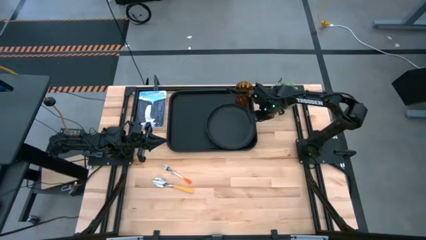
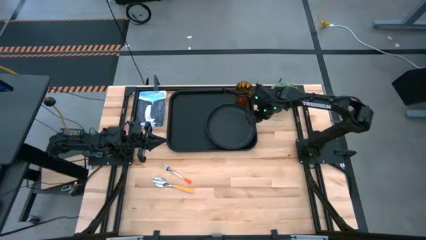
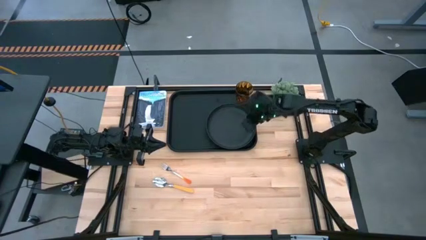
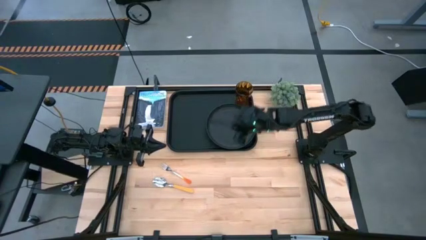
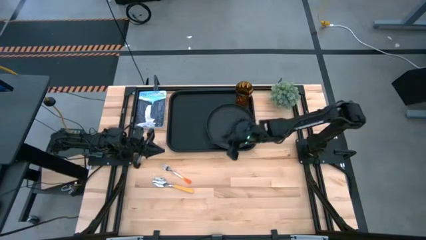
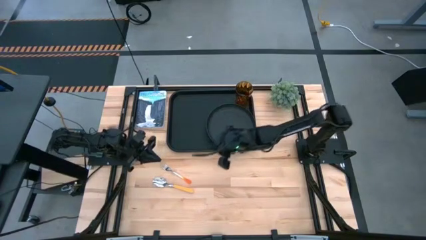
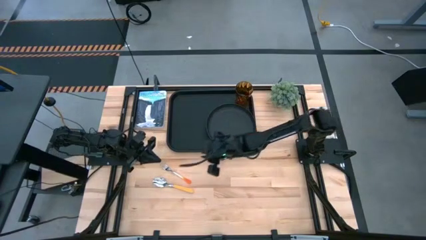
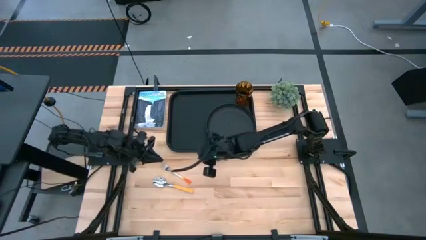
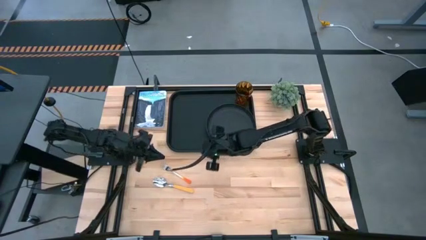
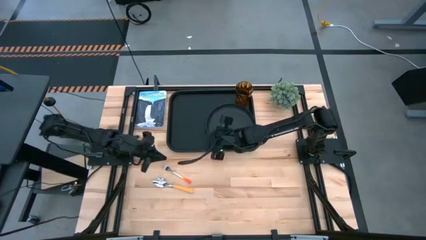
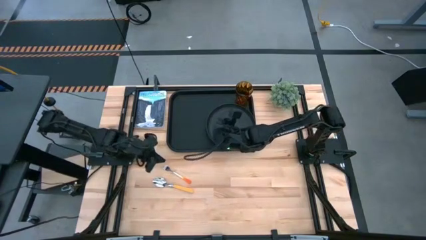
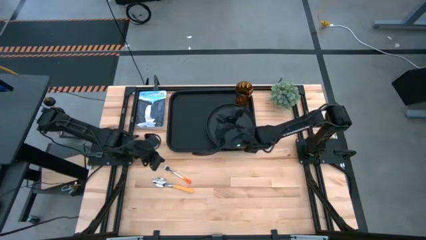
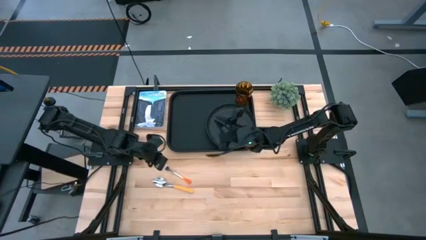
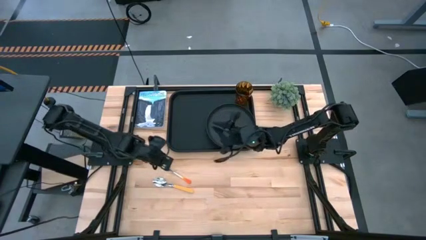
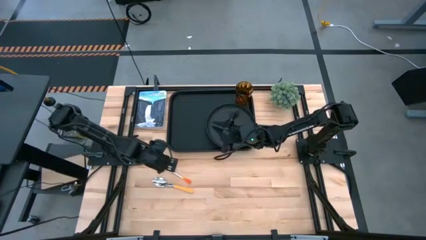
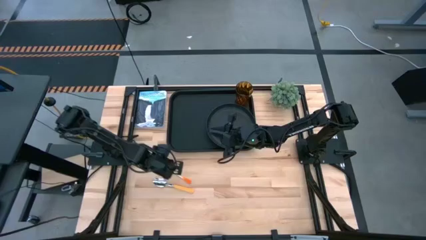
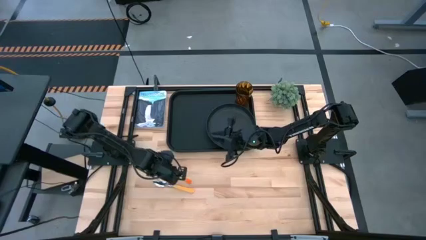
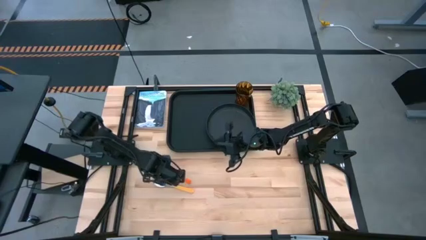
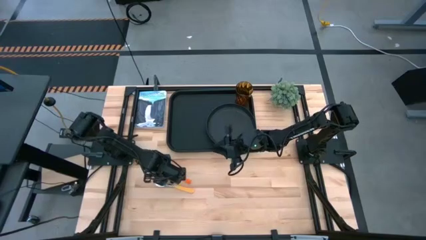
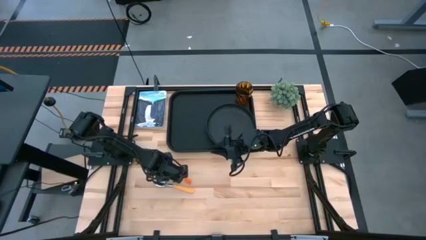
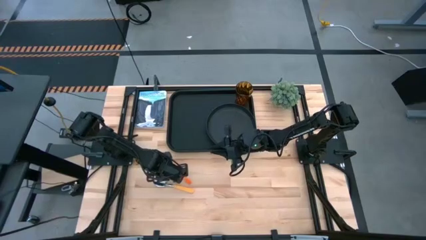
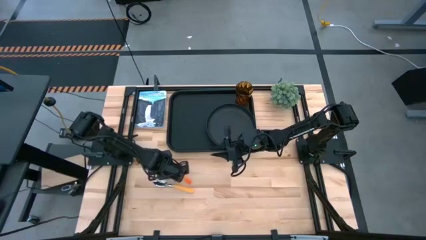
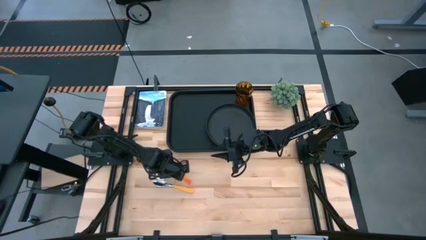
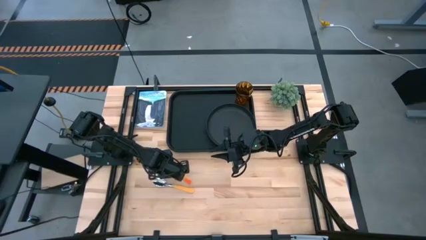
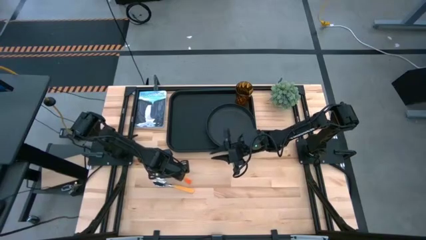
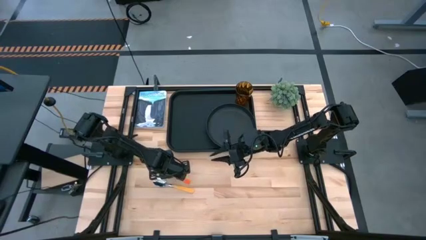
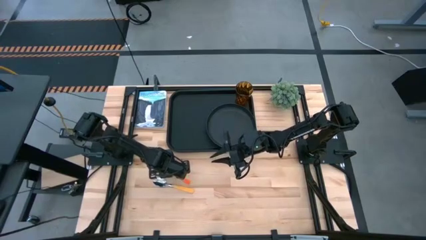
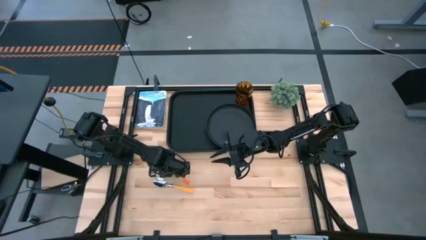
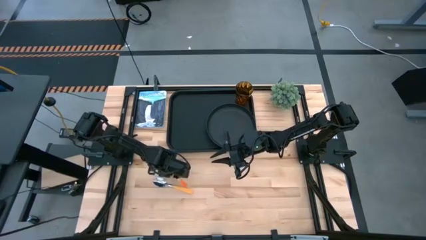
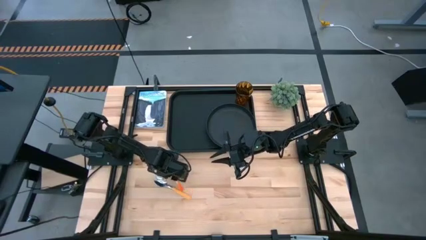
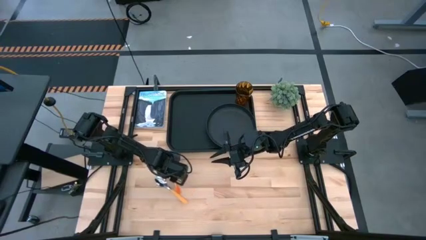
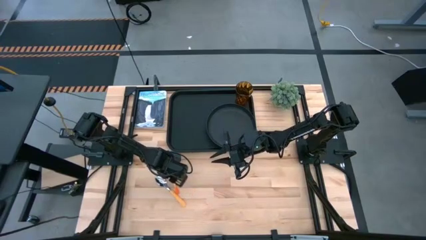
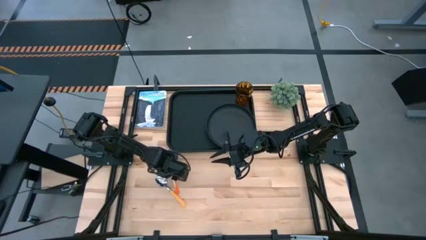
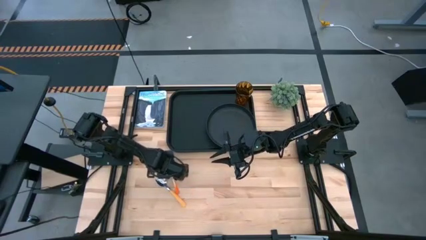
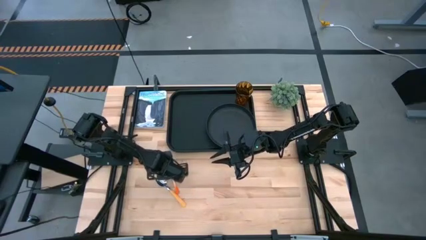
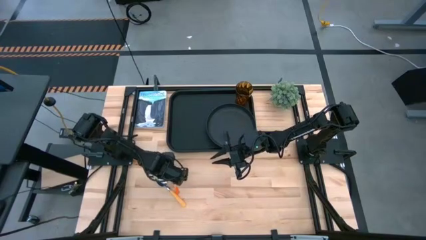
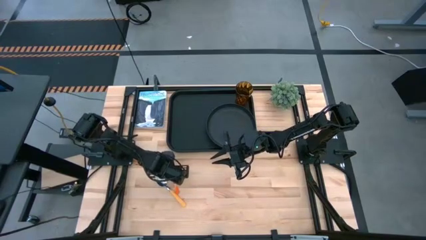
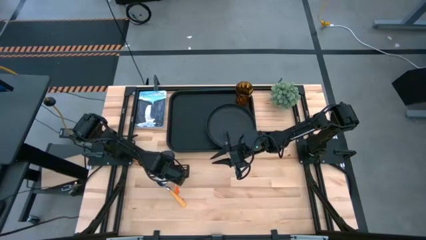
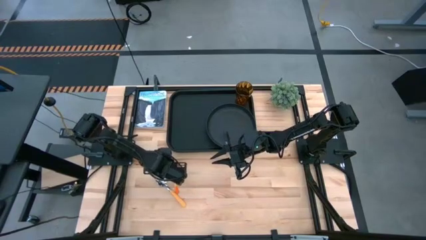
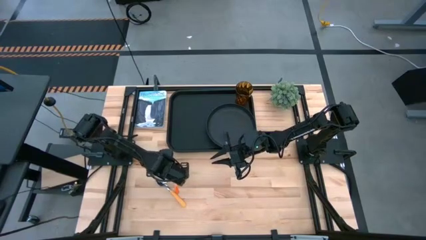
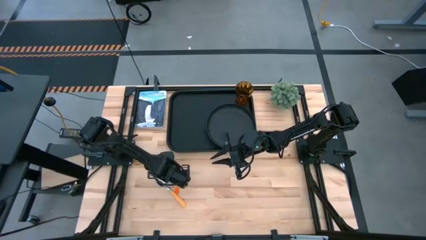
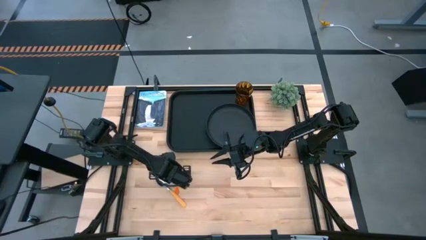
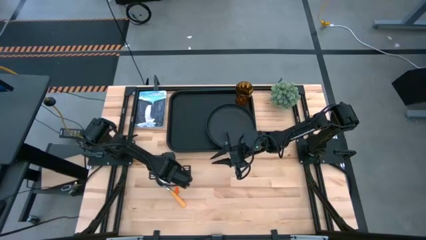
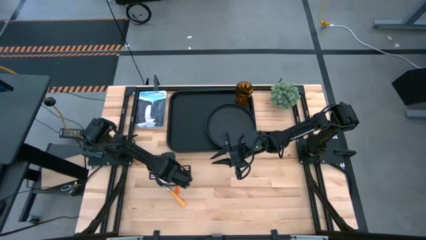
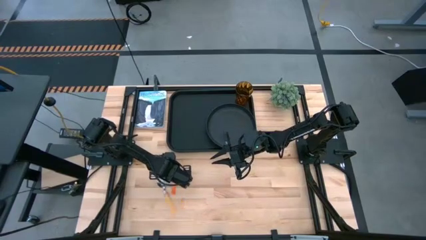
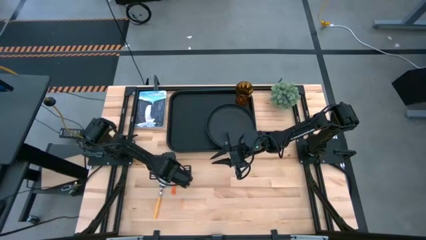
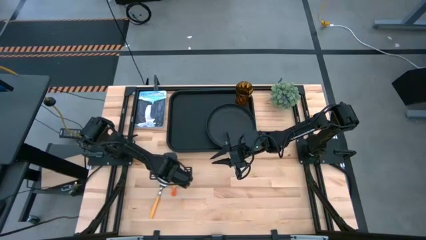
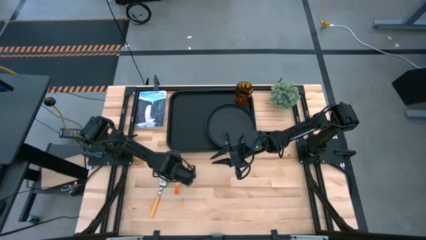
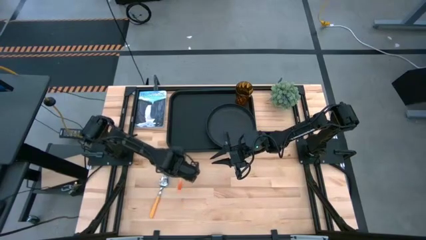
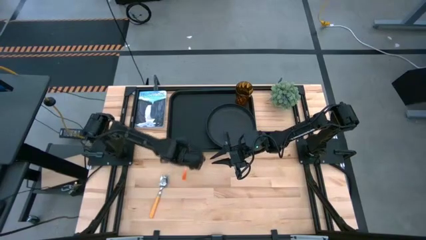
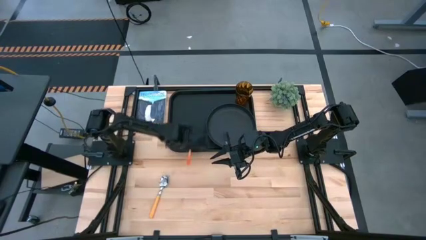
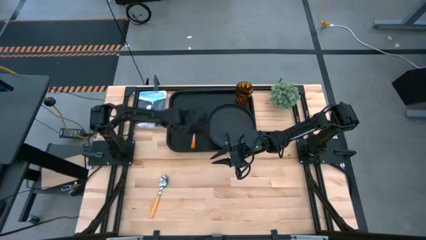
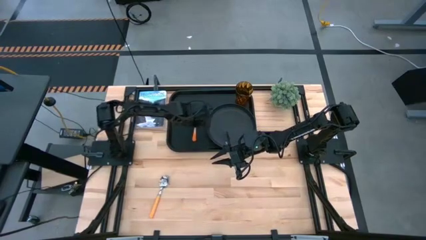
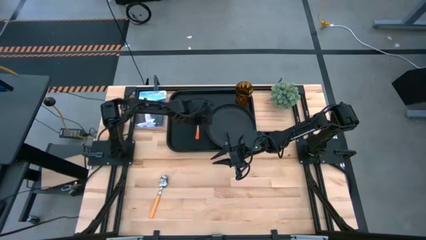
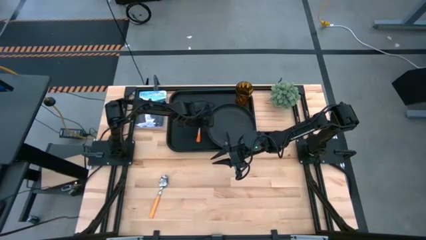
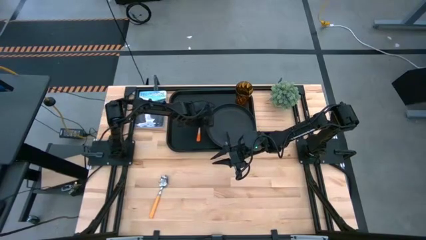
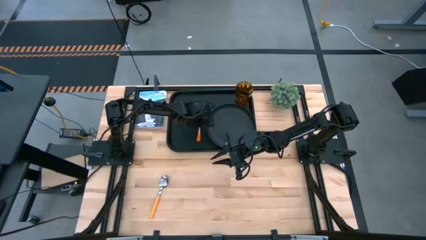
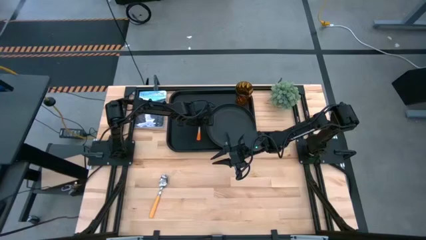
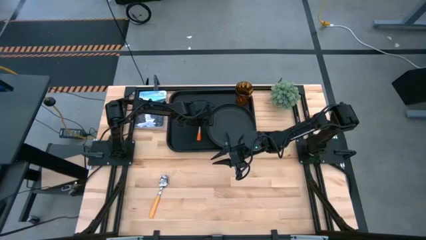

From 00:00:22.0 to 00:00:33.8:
Task: Pick and place plate/cup/fork/spoon on tray
Put the orange fork on the black tray to the left of the black plate

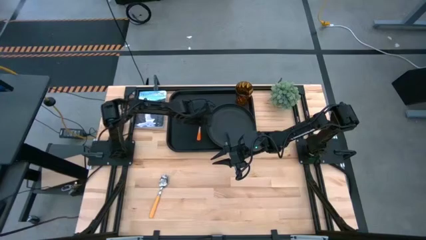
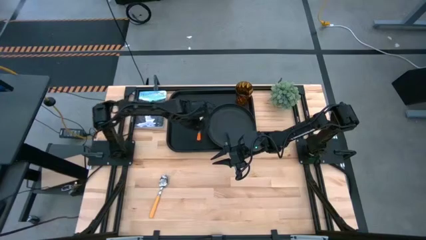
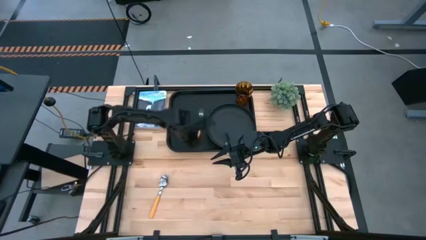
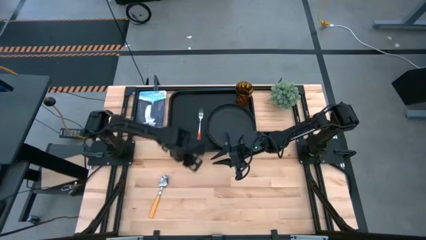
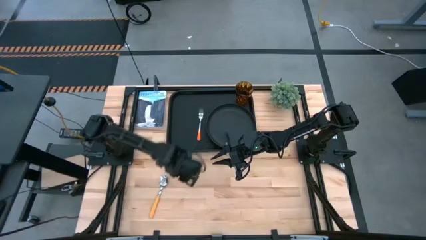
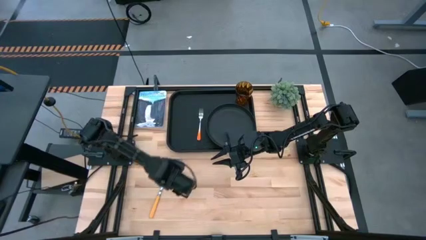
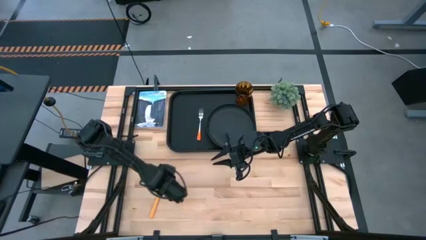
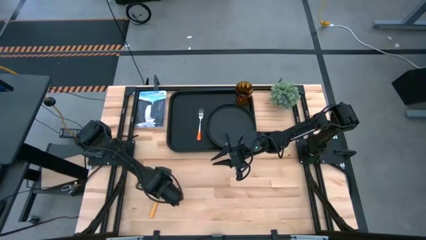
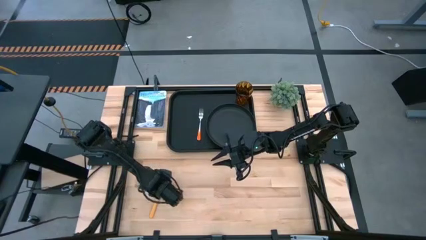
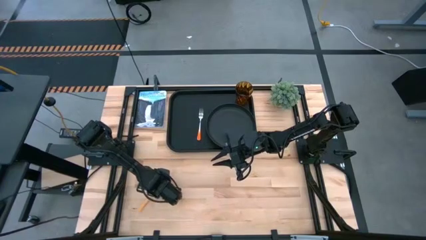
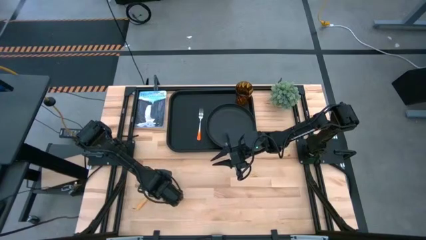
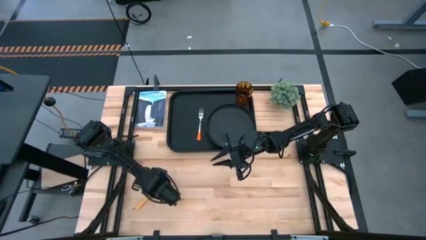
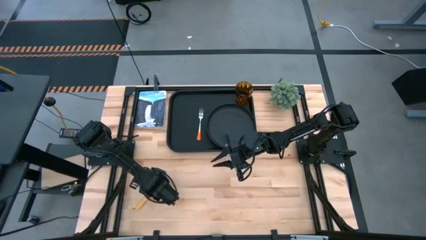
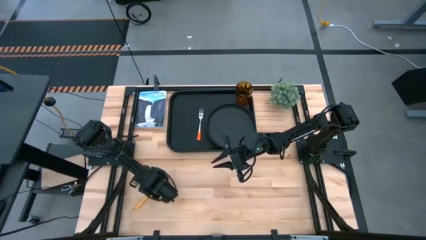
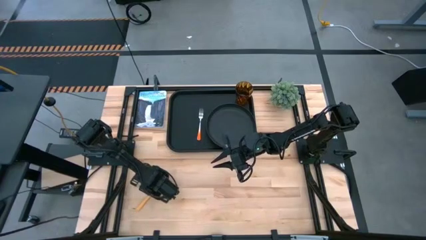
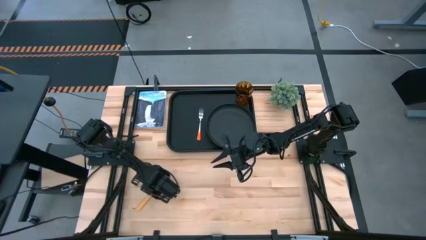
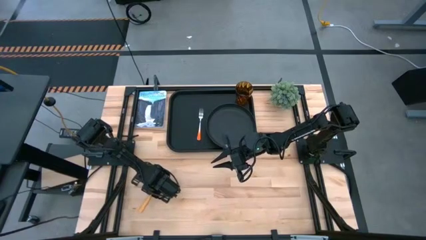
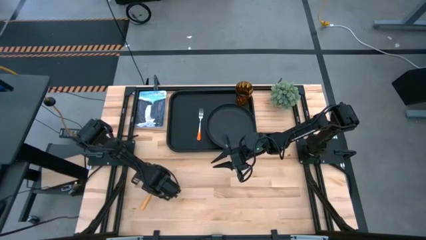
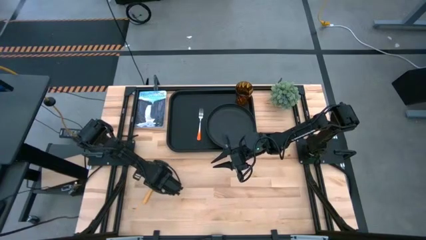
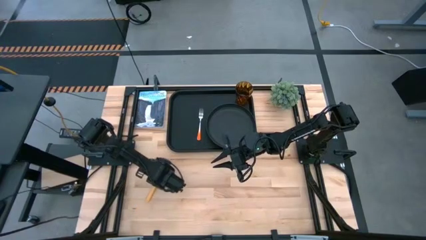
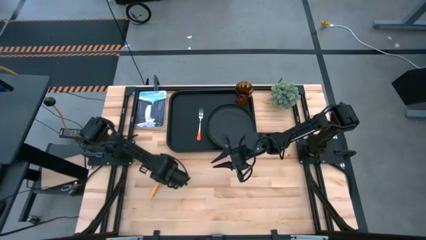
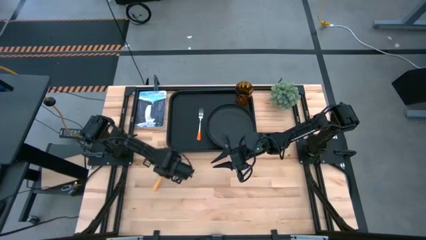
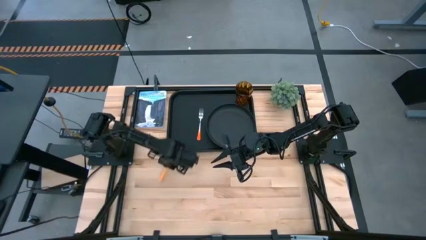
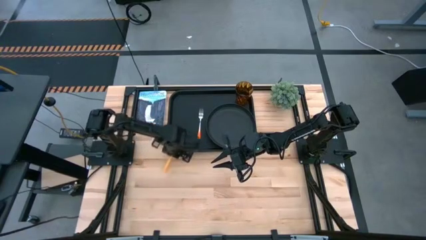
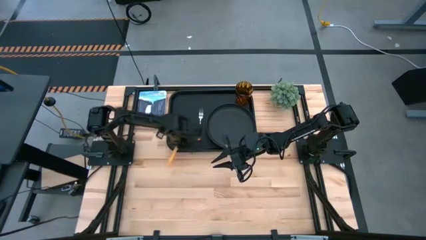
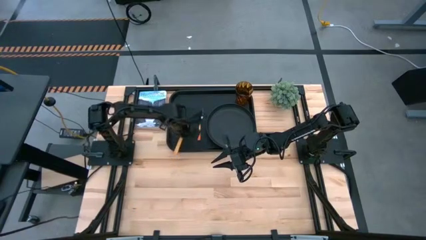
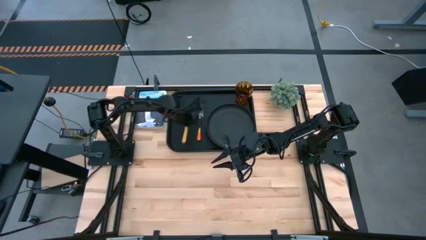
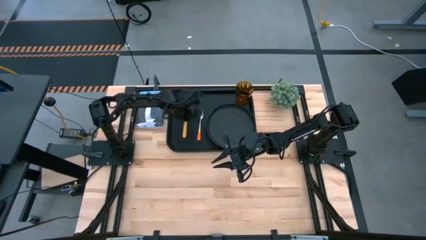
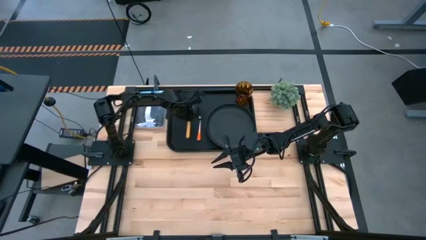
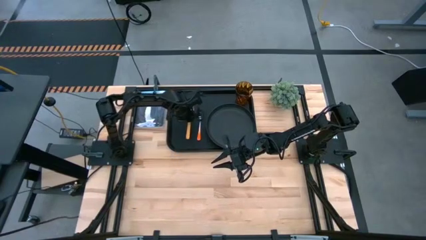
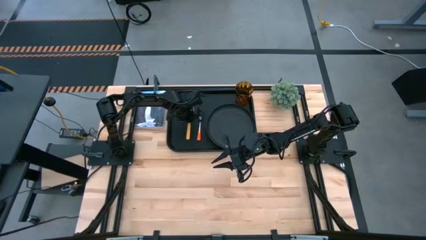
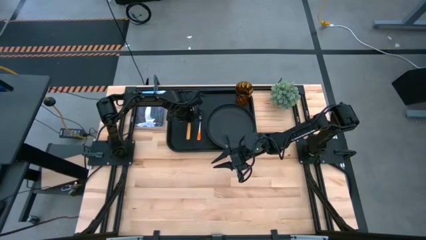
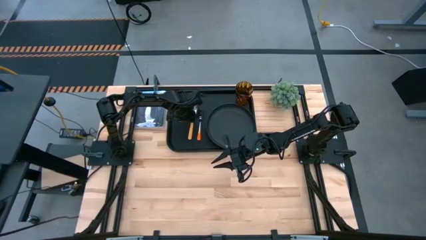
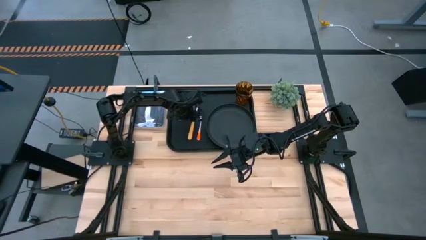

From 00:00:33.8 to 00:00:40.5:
Put the yellow spoon on the black tray to the left of the orange fork
